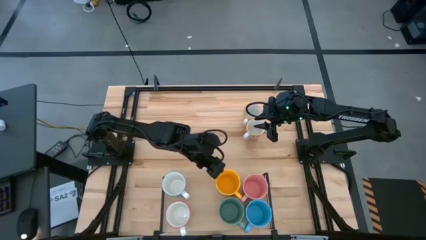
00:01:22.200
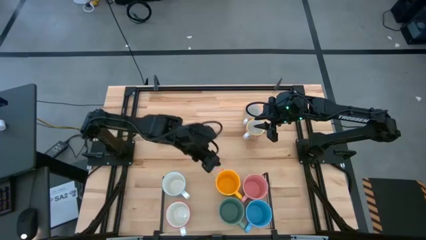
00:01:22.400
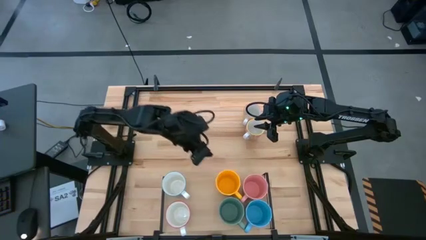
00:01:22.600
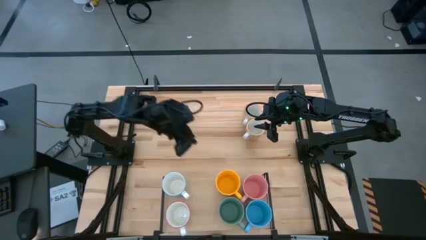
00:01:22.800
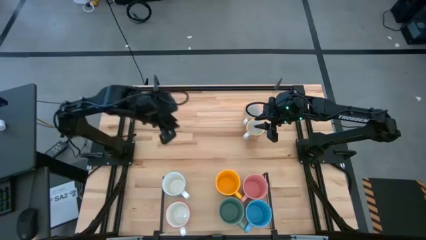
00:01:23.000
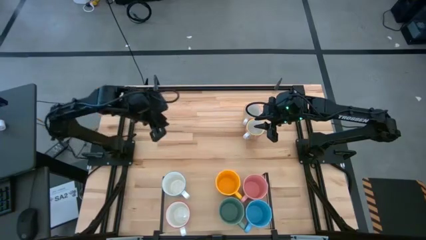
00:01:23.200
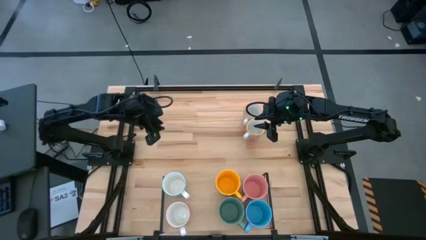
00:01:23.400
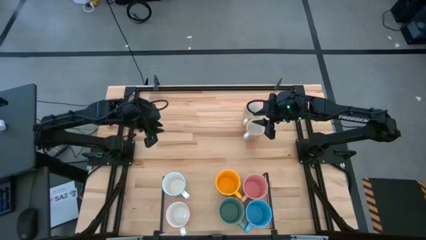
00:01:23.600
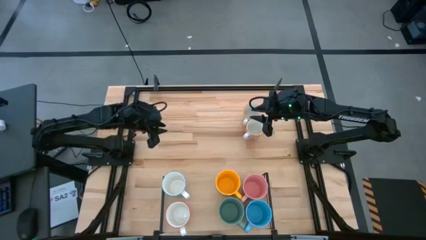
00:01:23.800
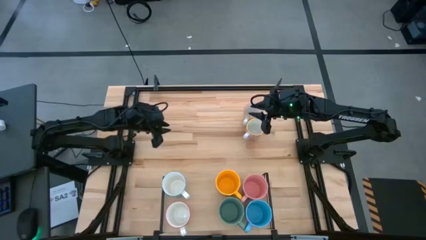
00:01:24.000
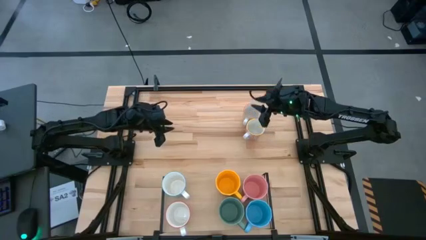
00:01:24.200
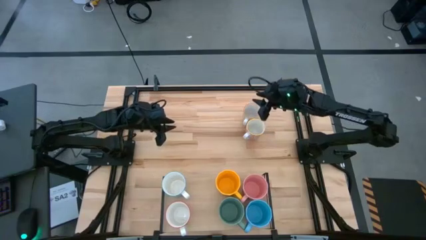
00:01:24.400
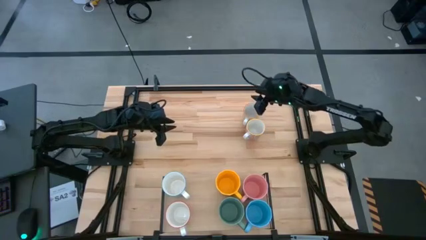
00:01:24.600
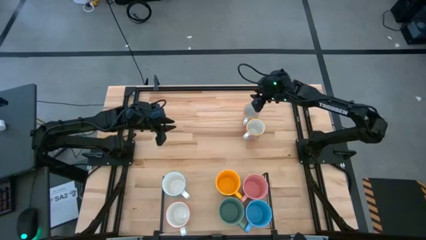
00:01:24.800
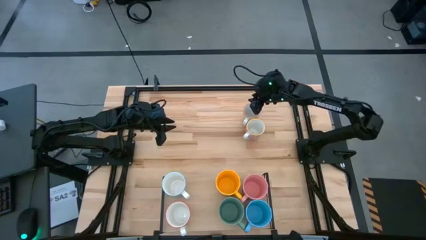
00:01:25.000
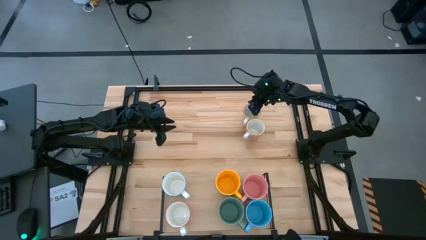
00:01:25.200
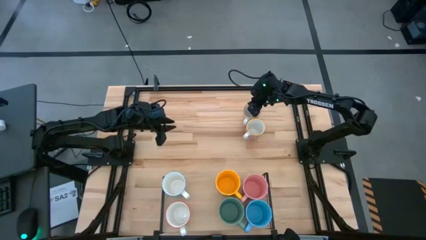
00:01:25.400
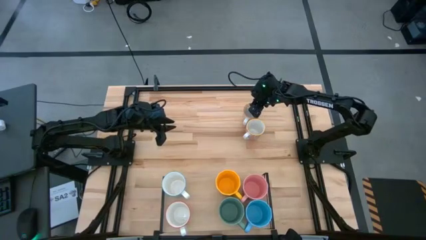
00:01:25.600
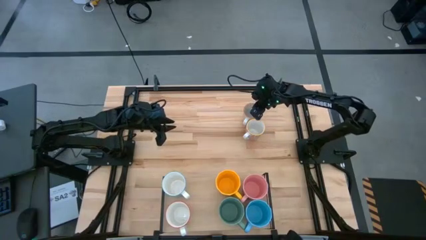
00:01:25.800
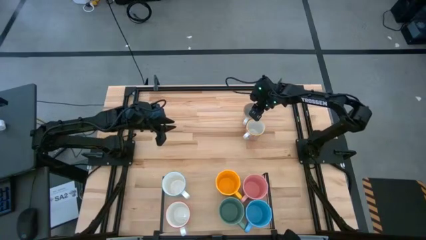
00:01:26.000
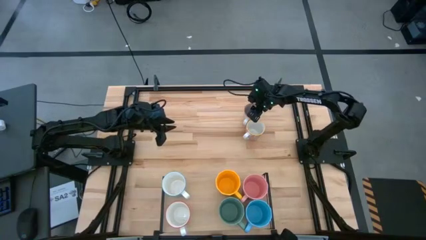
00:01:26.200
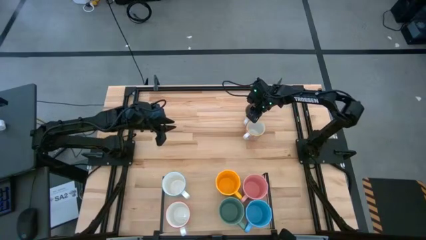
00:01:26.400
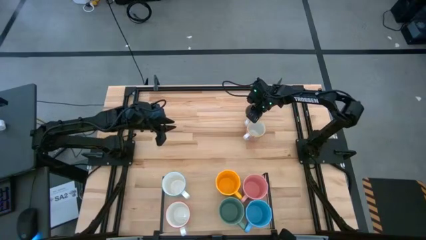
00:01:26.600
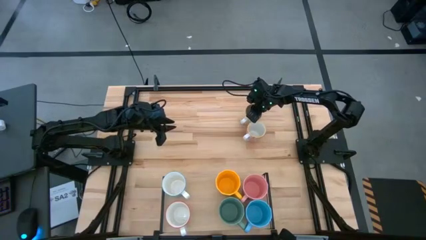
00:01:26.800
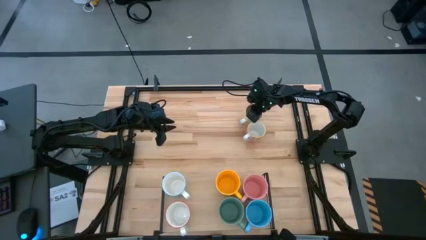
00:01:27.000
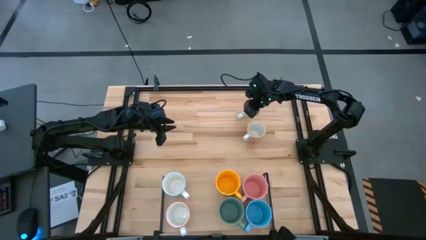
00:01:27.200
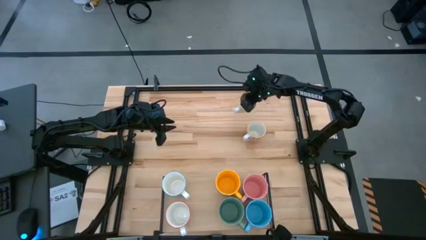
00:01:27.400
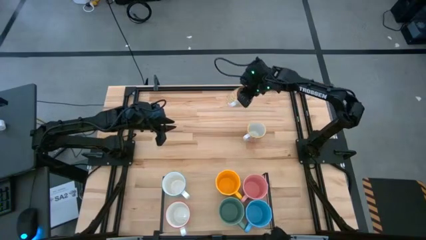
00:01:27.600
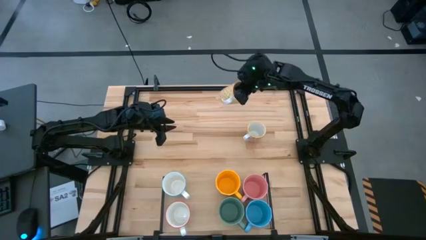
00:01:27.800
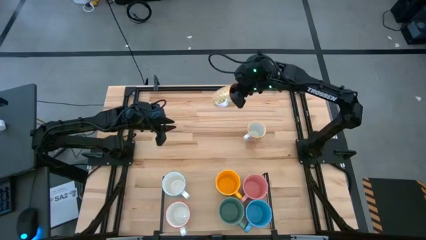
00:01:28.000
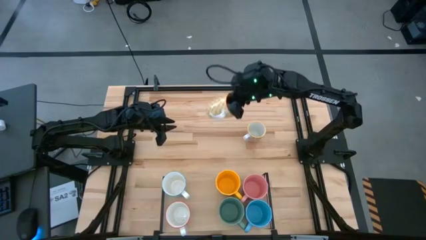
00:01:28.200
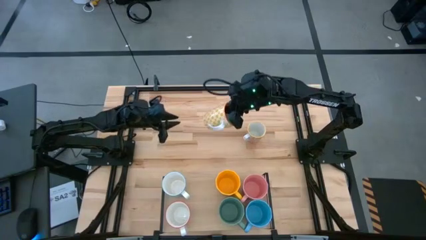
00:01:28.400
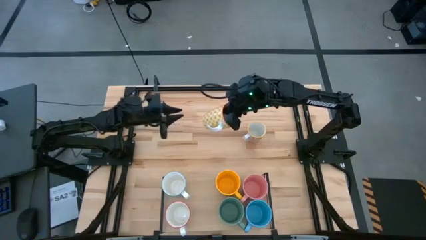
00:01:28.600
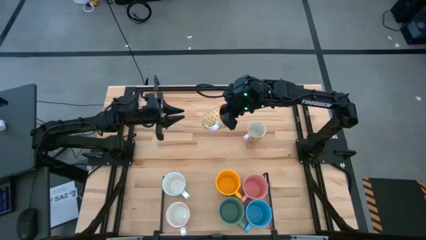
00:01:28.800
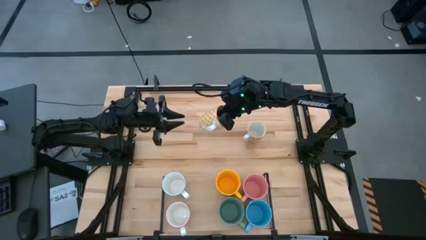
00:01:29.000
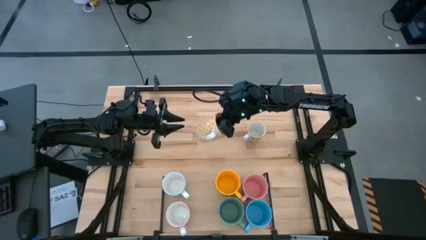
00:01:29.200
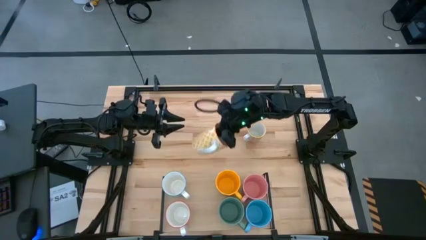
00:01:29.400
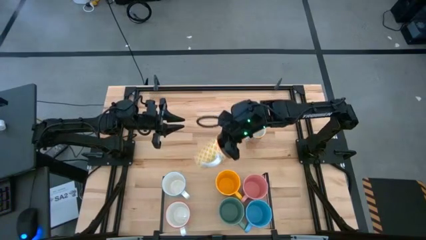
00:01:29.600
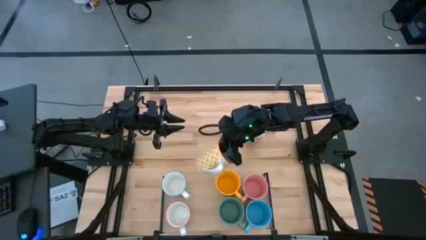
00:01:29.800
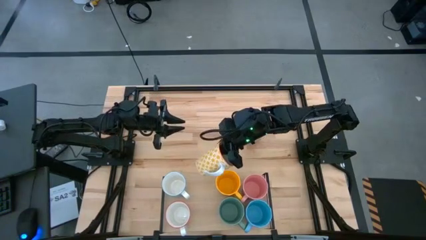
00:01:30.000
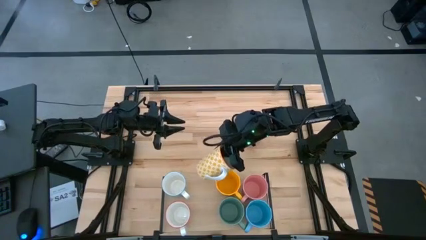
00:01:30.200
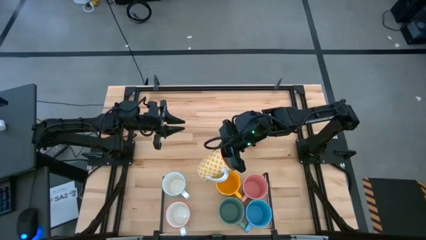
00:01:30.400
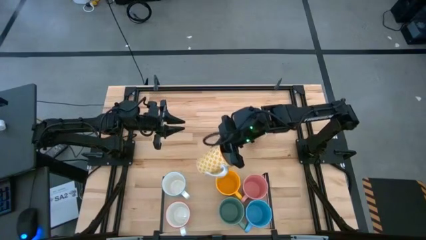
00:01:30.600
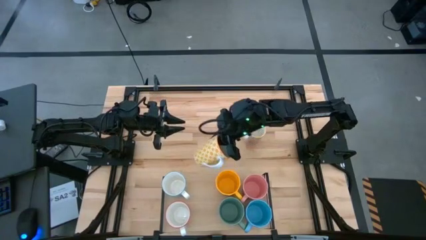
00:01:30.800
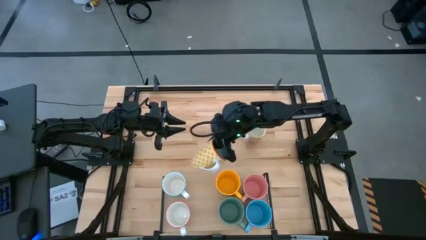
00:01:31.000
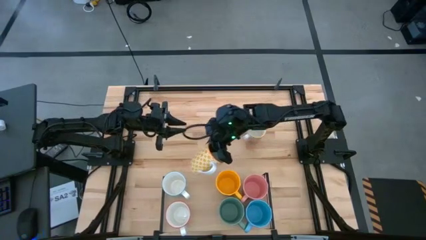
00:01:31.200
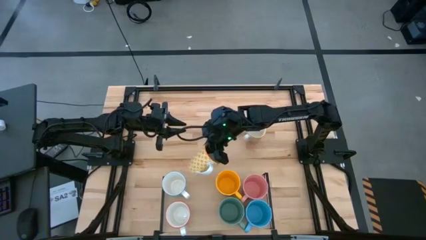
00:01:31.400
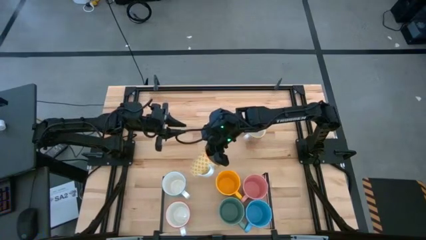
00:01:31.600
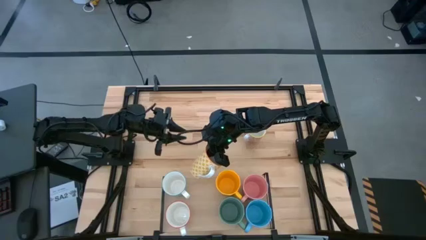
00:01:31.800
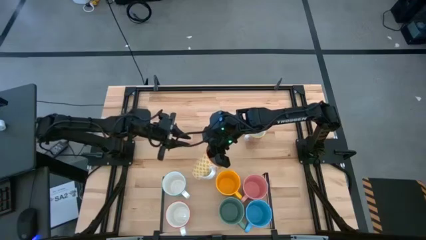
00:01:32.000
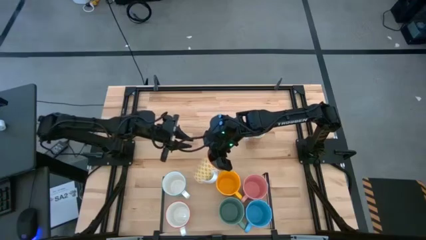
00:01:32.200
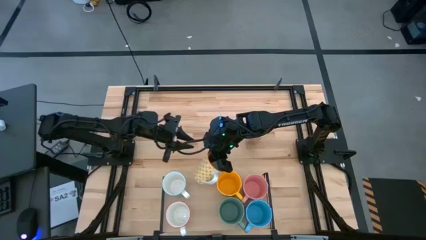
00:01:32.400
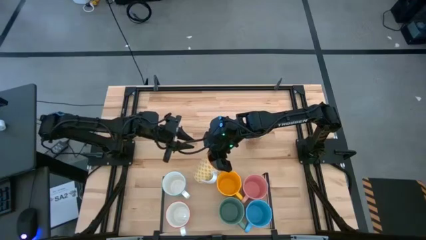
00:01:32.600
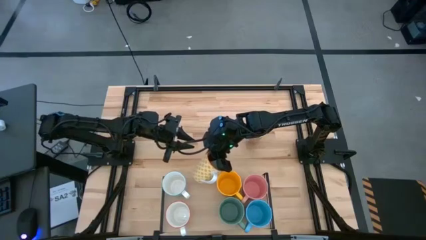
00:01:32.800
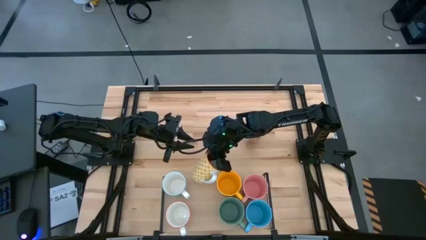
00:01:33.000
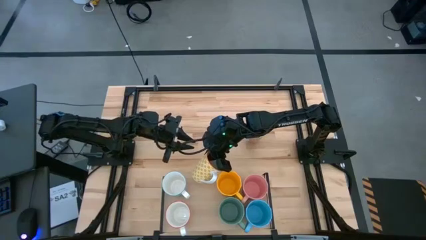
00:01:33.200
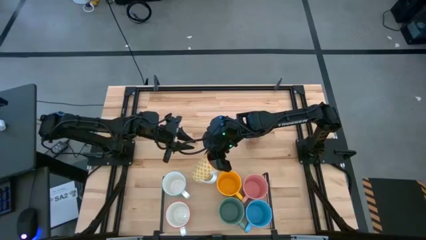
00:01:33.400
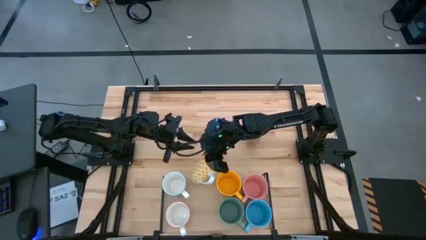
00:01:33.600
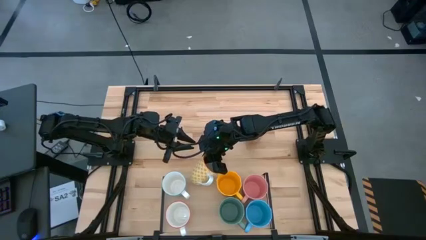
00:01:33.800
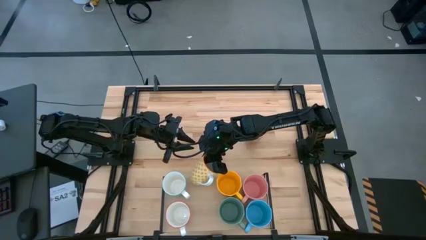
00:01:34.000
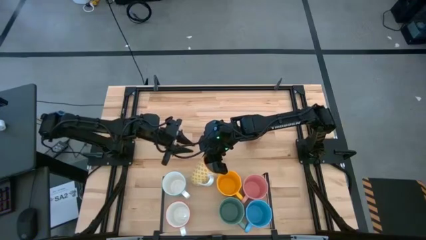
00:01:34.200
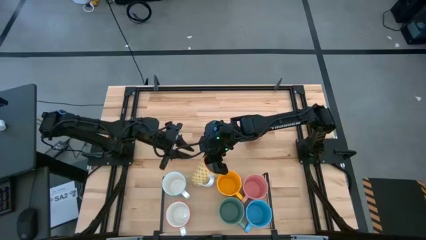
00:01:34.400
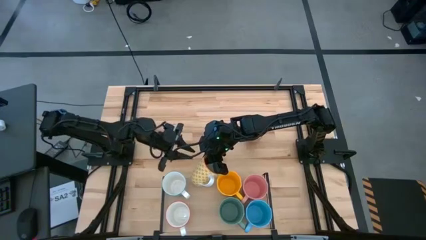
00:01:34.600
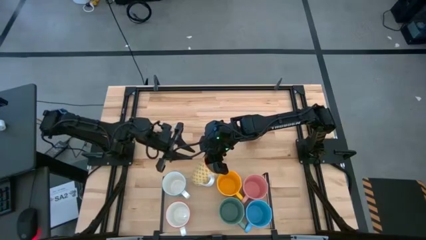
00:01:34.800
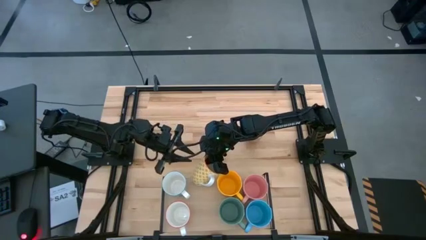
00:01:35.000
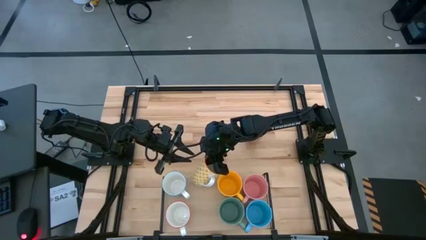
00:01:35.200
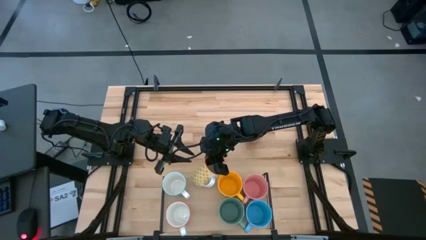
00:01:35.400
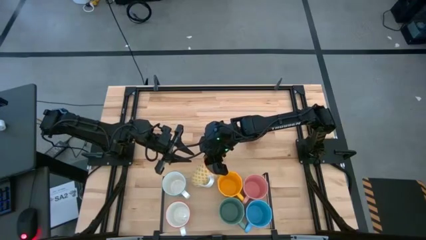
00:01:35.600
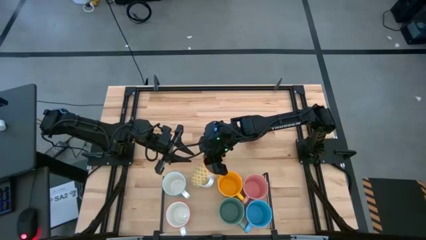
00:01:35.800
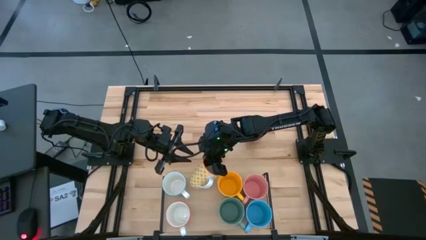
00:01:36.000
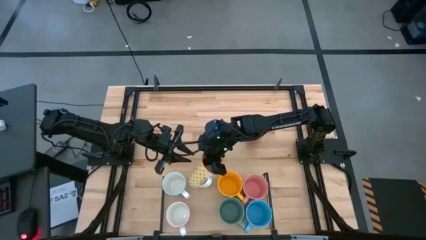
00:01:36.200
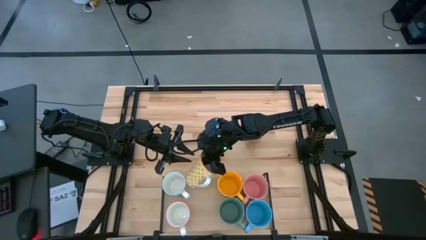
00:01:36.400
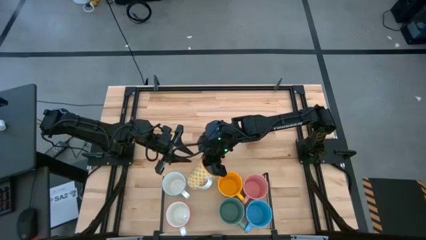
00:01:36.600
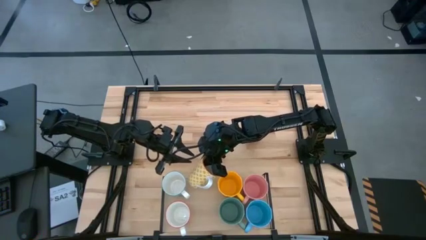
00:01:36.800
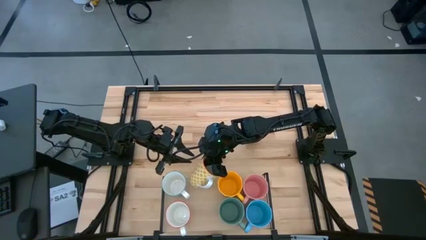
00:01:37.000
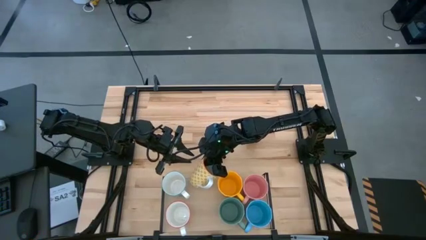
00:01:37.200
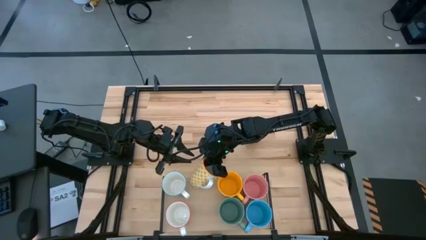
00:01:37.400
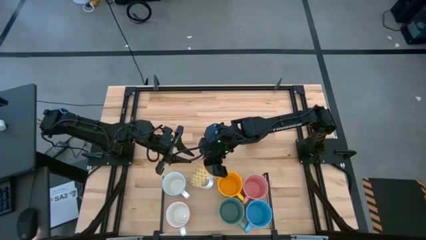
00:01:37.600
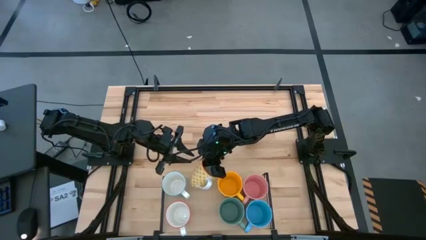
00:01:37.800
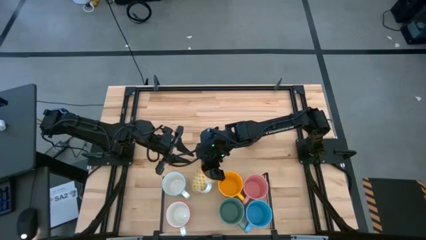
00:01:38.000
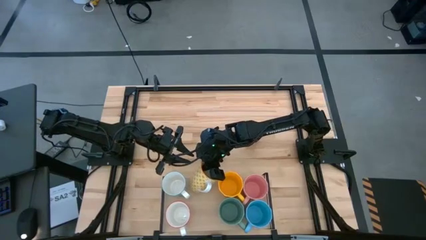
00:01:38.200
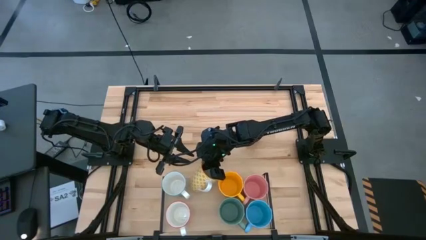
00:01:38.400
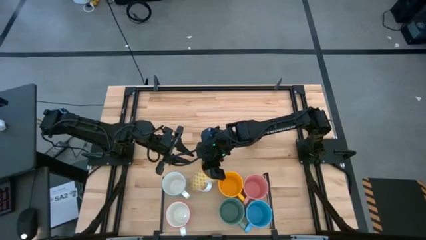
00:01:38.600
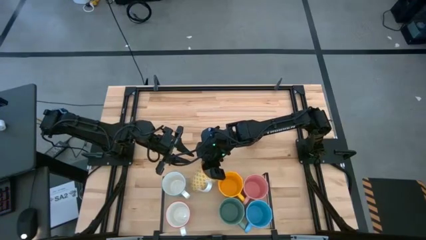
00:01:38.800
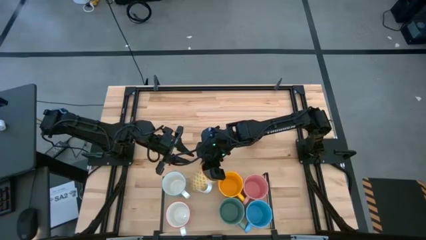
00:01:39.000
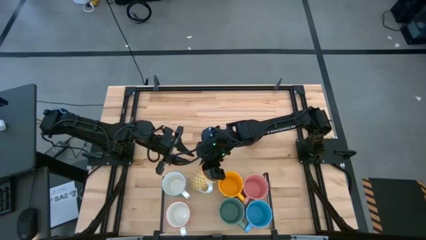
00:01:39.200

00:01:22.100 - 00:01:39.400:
Task: Place coffee mugs
Put the light yellow rim mug on the shelf
